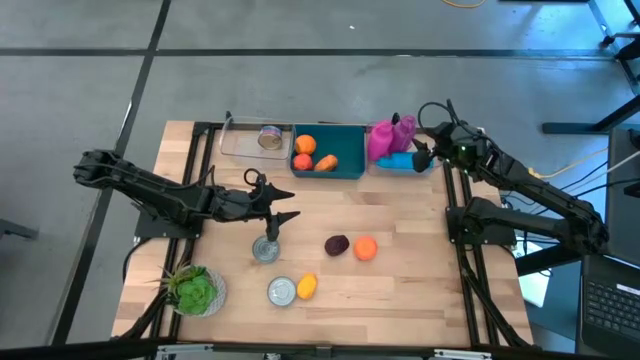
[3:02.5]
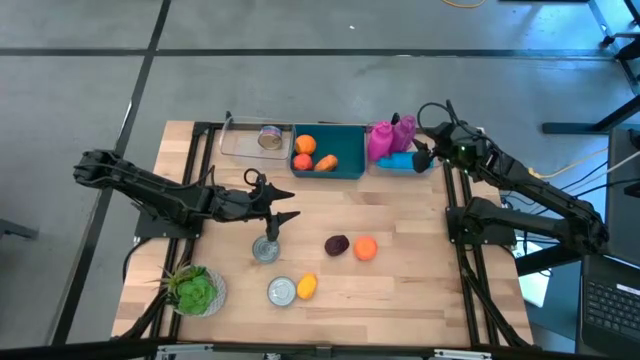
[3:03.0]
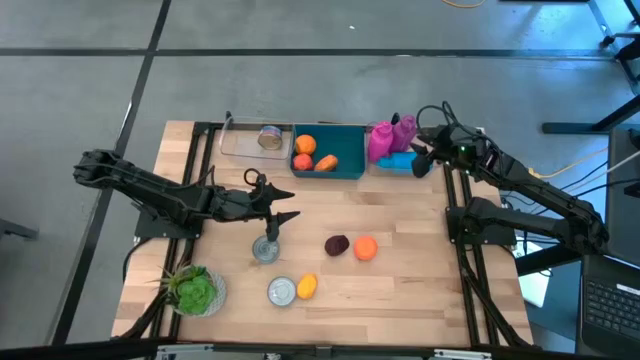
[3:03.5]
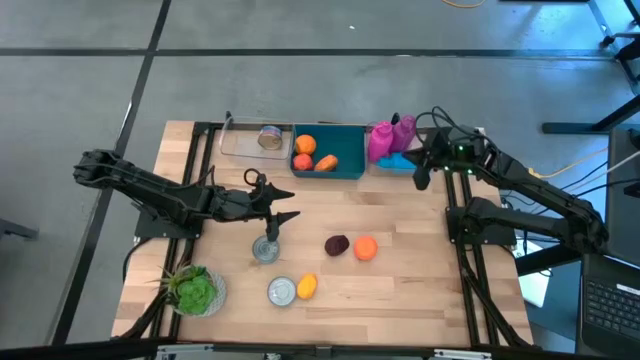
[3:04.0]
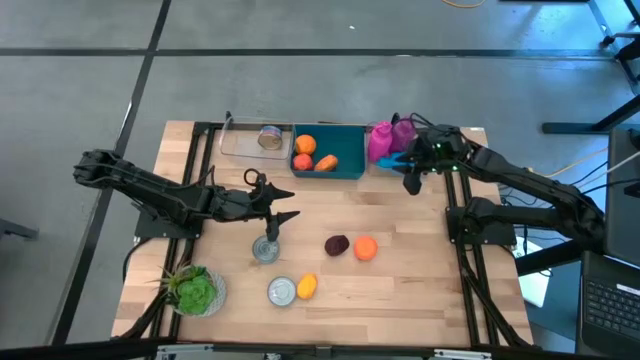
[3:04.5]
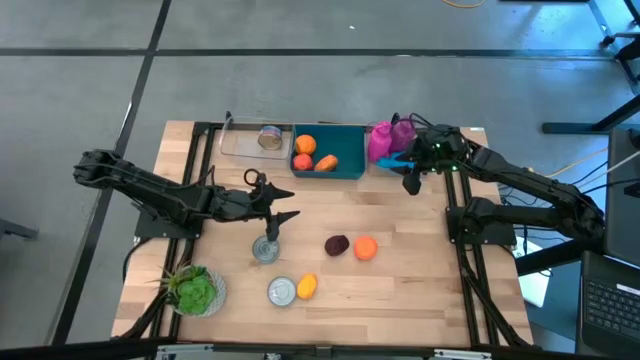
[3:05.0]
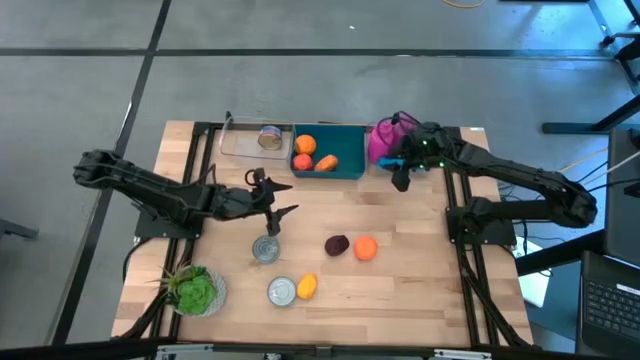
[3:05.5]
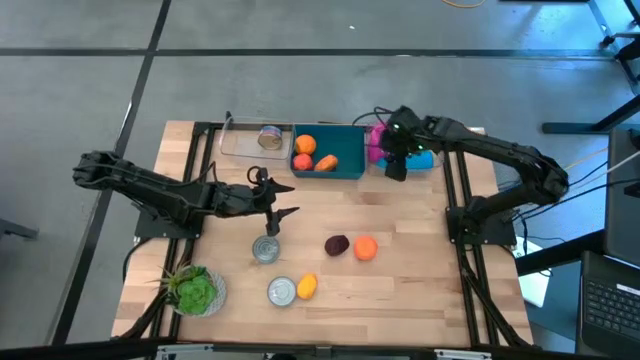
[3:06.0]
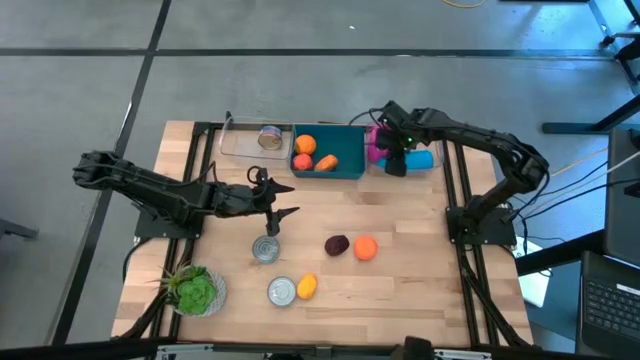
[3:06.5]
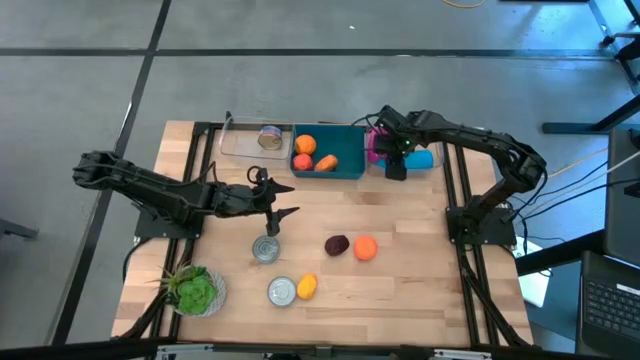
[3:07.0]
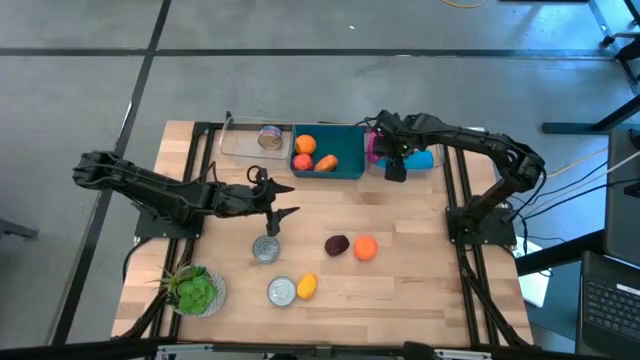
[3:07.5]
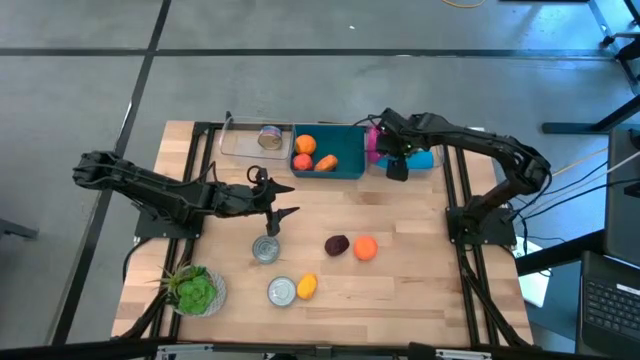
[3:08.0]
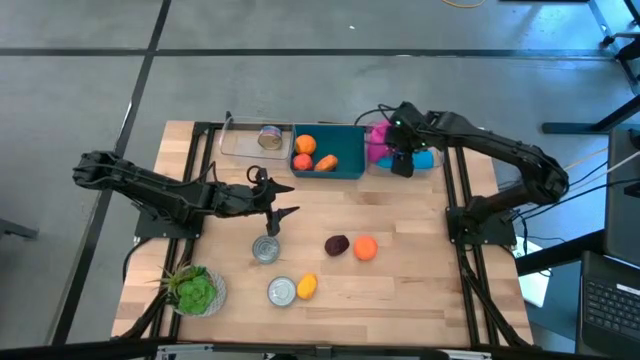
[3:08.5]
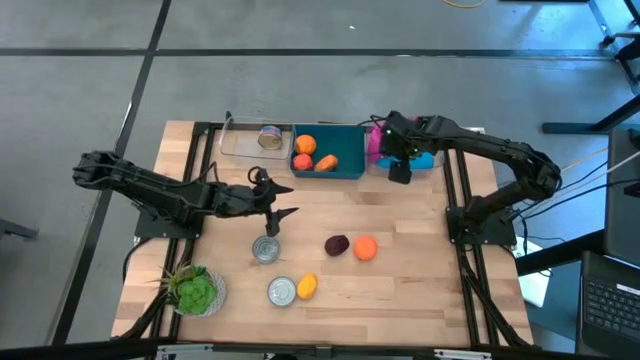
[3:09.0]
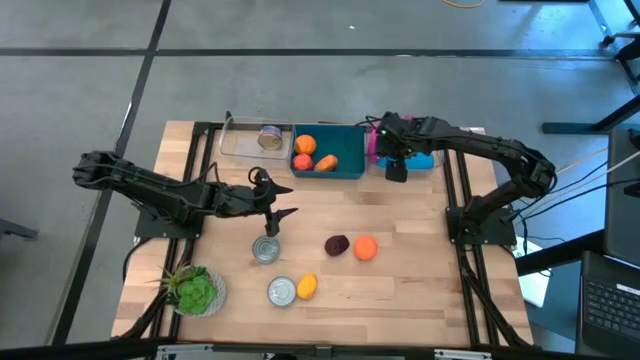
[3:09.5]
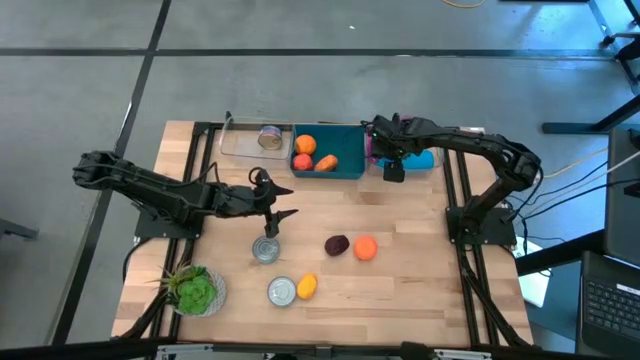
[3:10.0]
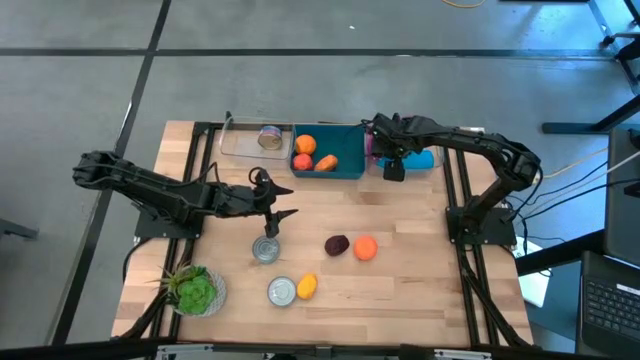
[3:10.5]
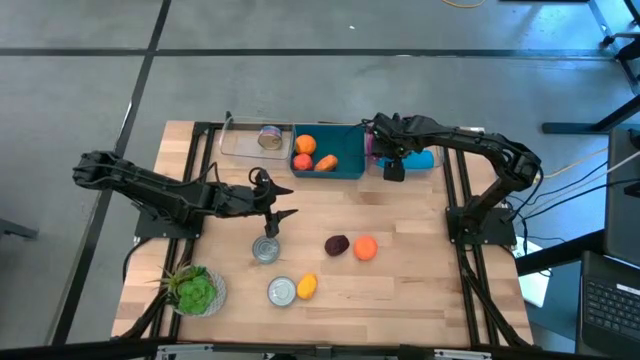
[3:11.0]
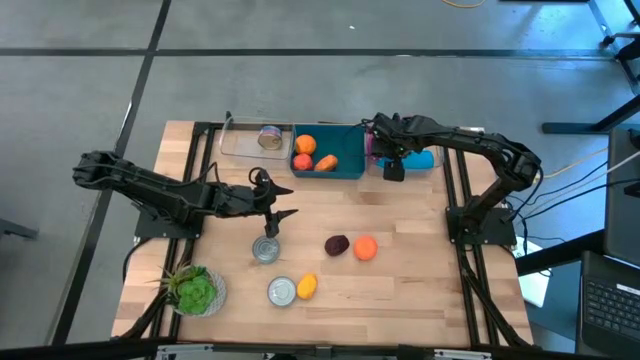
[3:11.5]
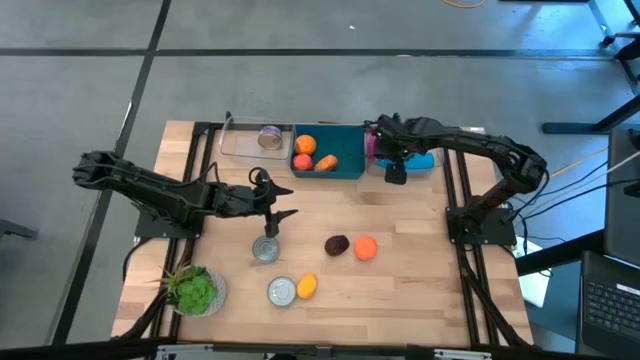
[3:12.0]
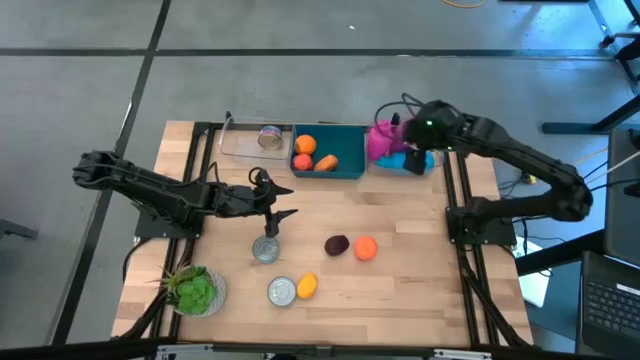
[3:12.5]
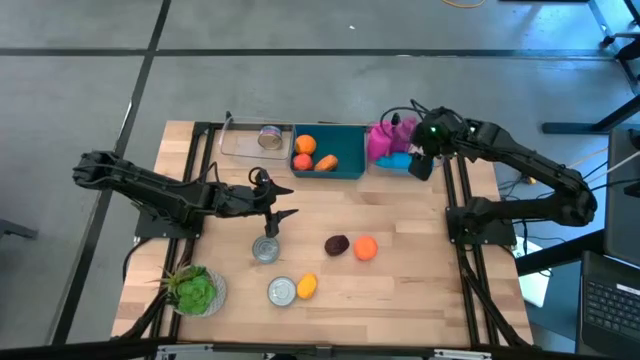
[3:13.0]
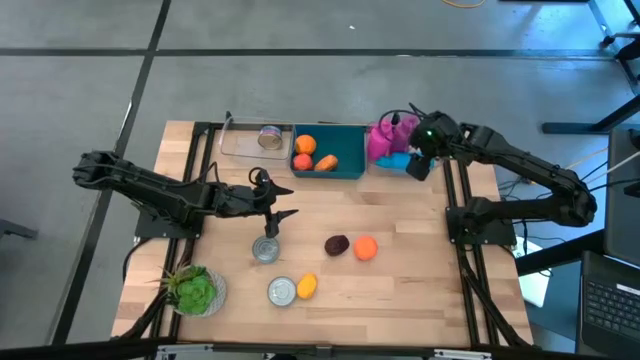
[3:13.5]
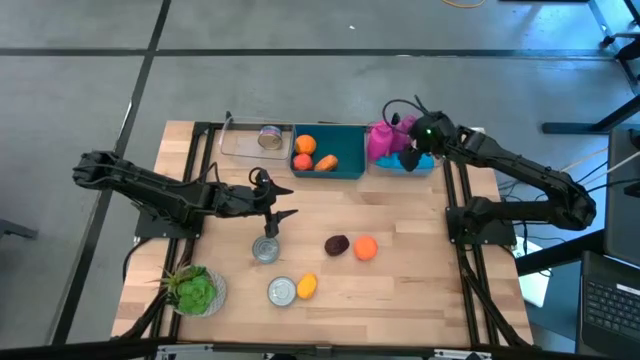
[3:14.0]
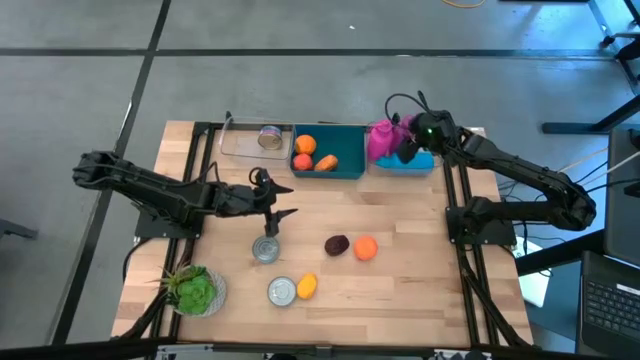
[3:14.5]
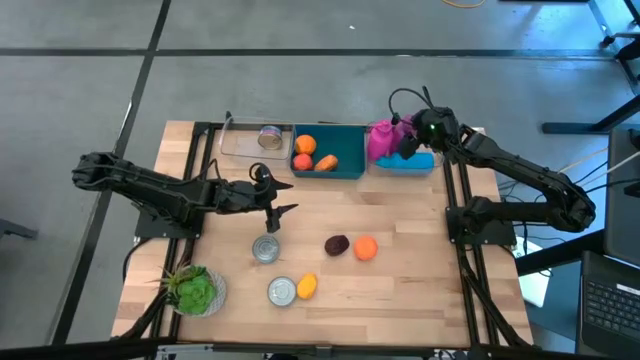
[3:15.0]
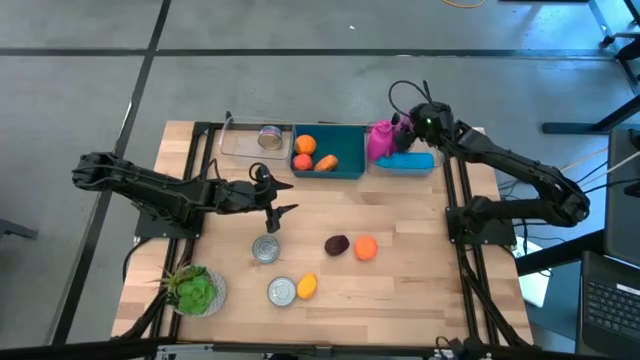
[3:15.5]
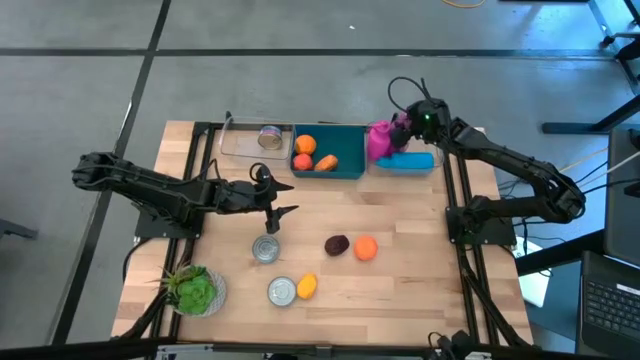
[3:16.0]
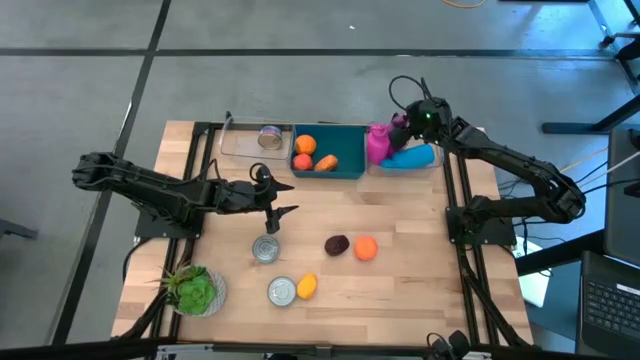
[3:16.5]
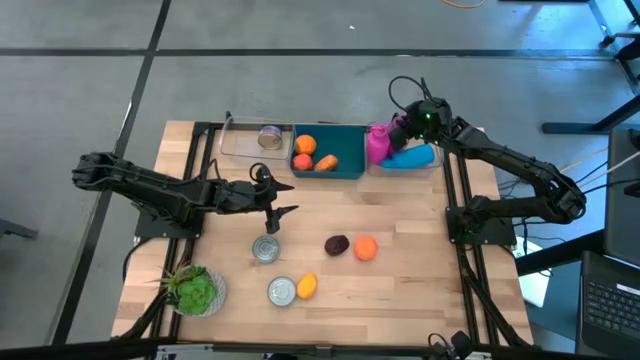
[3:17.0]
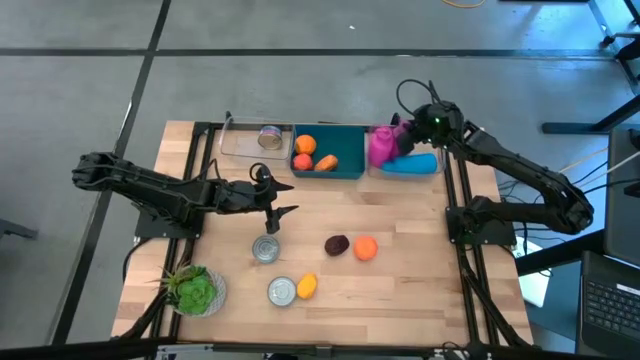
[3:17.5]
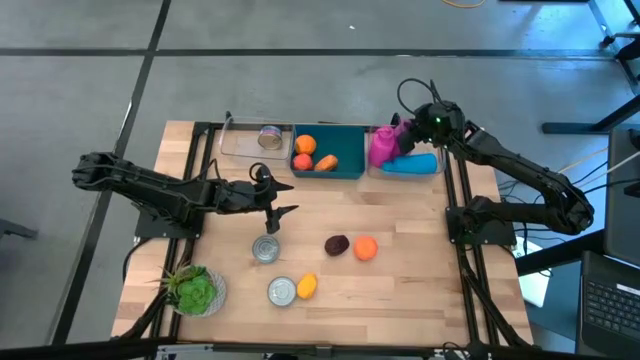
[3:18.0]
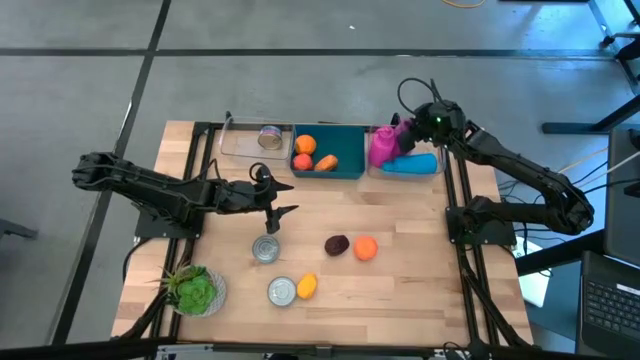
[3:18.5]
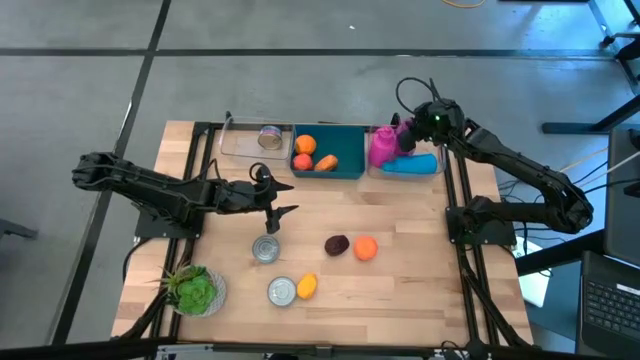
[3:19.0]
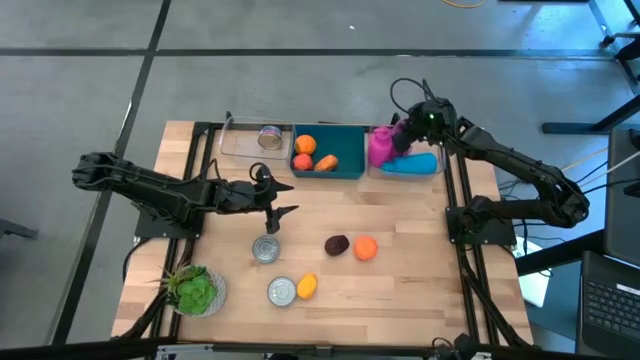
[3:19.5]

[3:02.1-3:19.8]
Task: Pick & Place Food Item
Adjust the violet water bottle

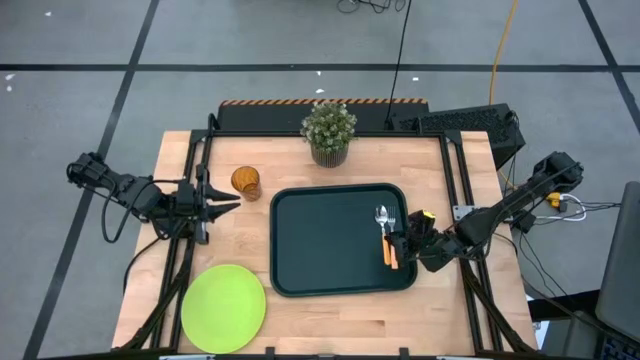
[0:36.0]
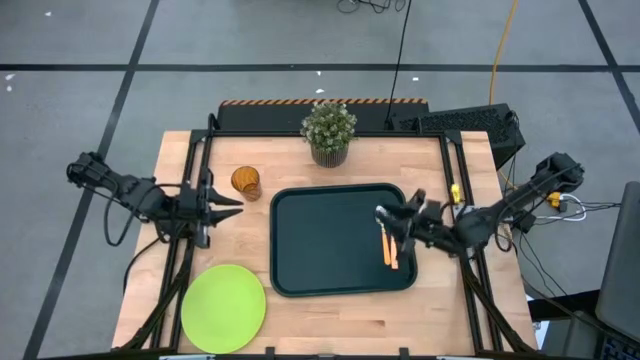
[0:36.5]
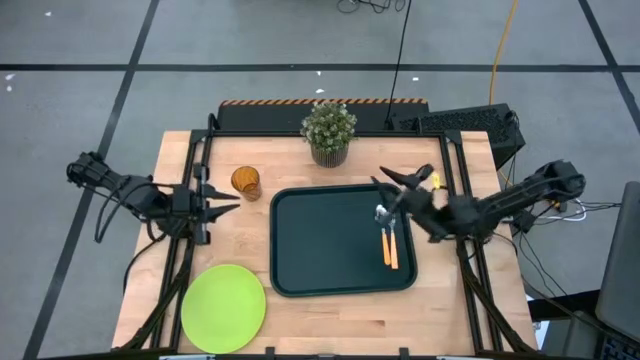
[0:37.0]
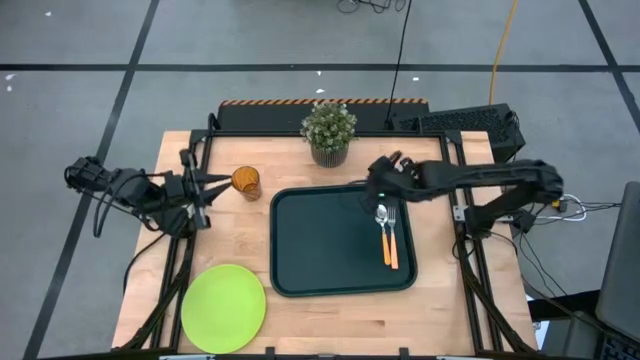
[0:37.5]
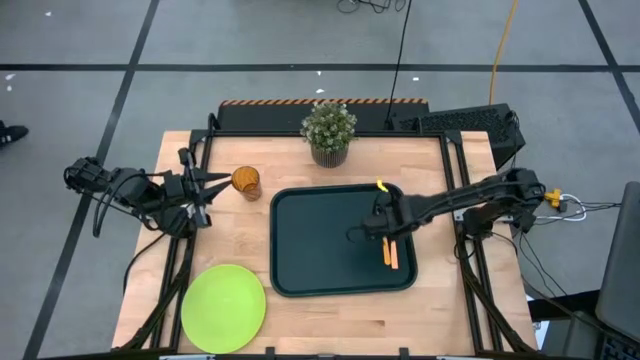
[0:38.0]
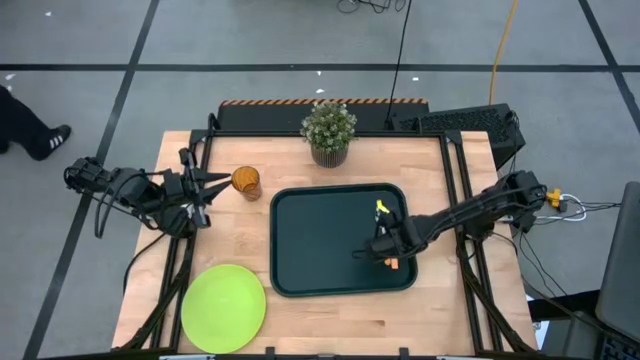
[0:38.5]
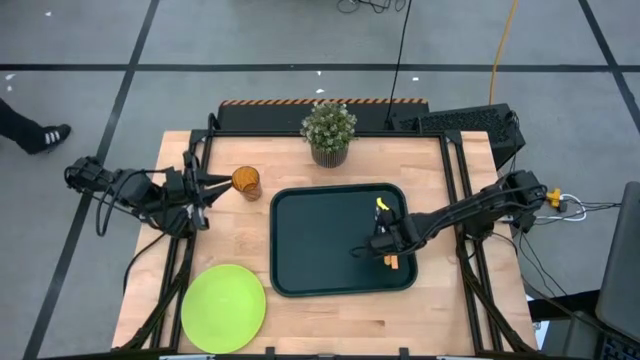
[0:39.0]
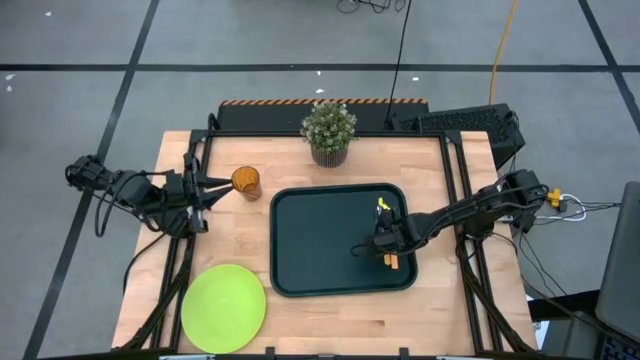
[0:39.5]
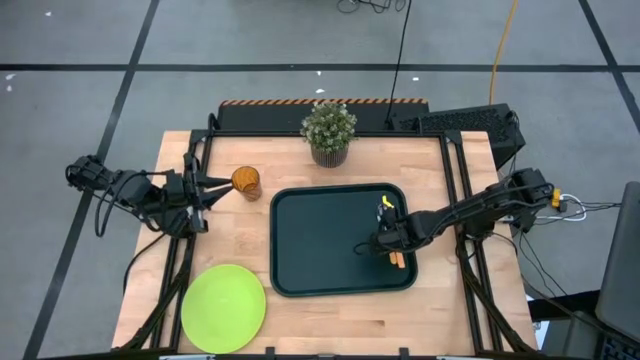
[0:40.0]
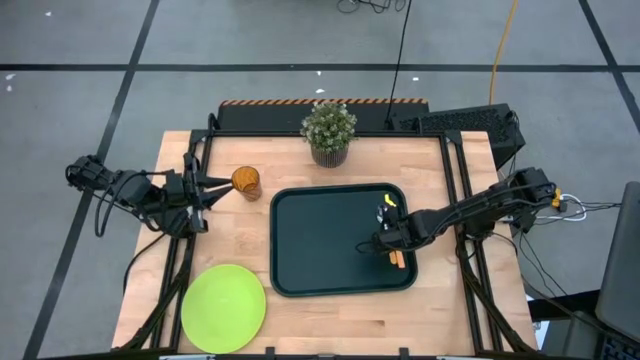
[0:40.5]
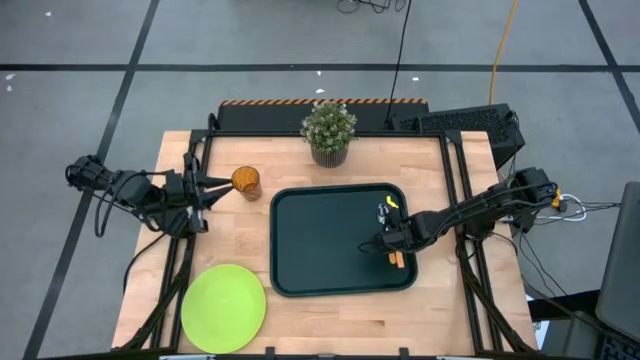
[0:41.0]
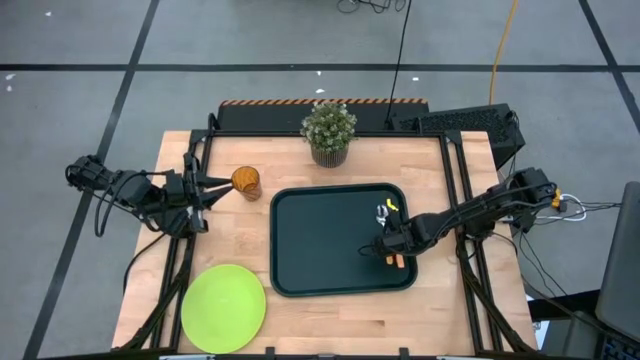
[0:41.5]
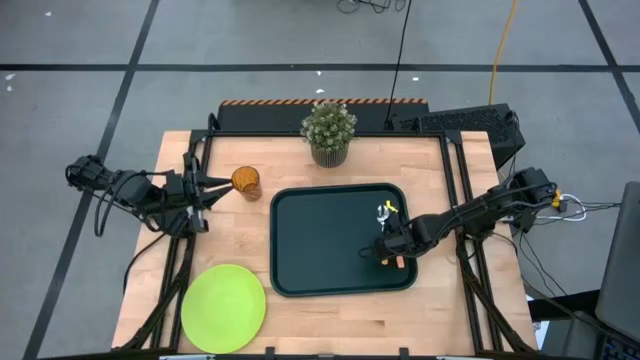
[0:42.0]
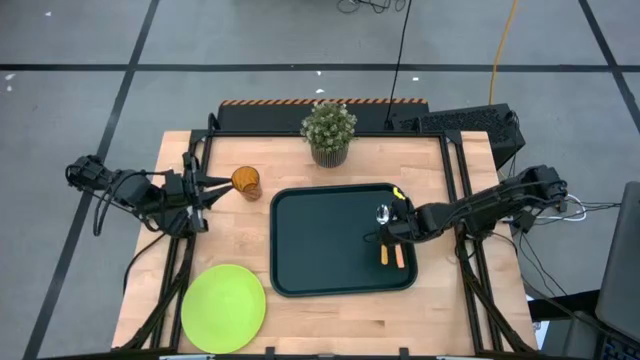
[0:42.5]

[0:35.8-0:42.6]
Task: Pick and place plate/cup/fork/spoon on tray
Adjust the spoon on the serving tray
